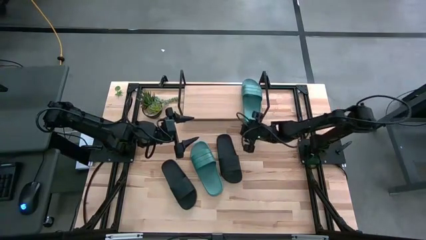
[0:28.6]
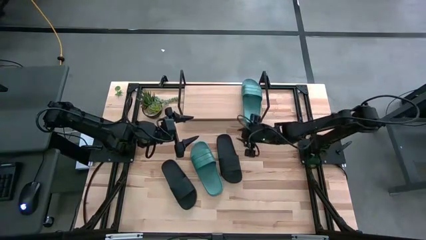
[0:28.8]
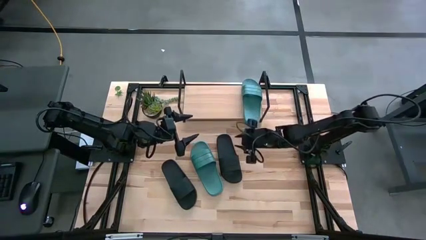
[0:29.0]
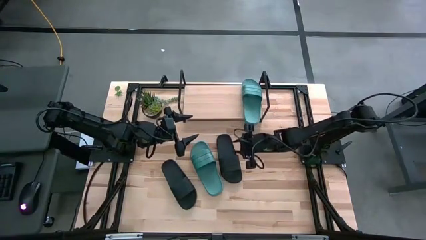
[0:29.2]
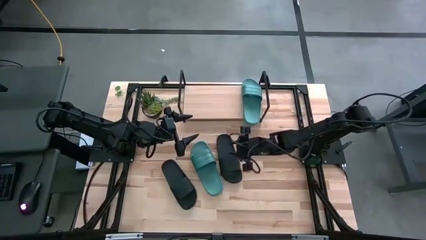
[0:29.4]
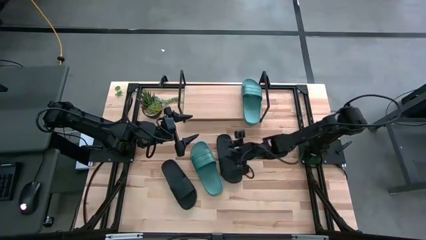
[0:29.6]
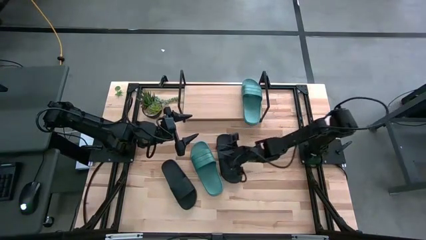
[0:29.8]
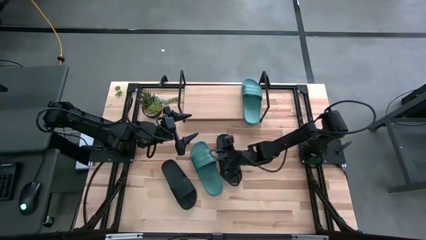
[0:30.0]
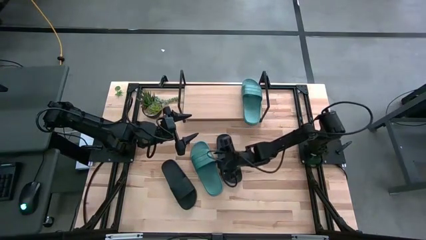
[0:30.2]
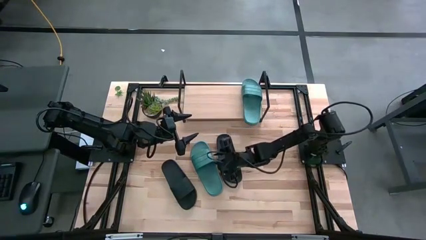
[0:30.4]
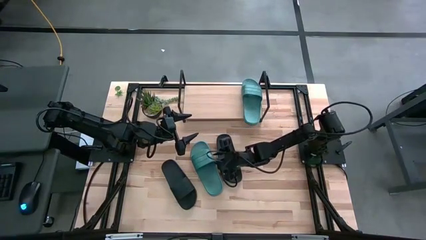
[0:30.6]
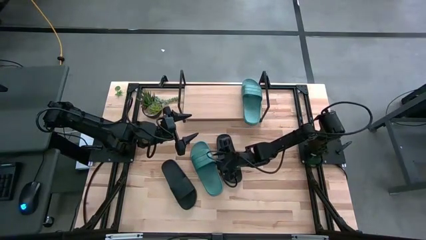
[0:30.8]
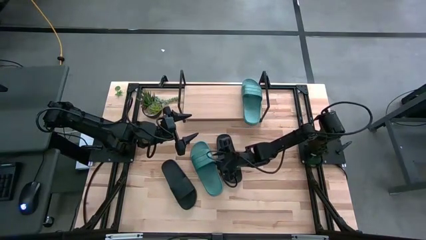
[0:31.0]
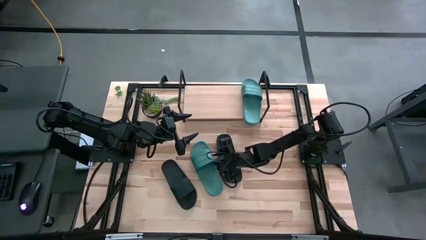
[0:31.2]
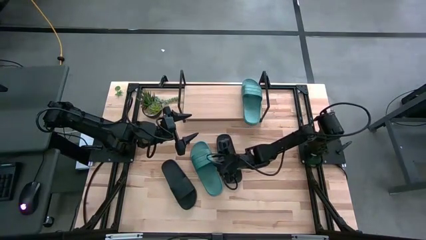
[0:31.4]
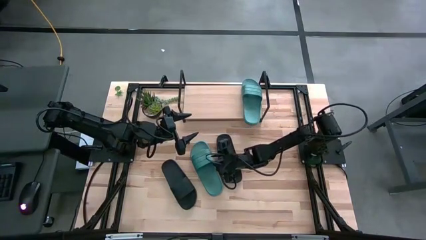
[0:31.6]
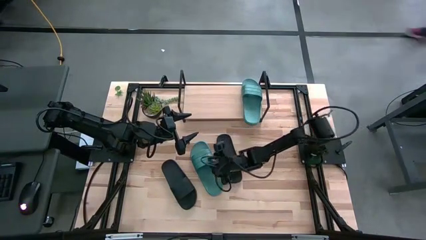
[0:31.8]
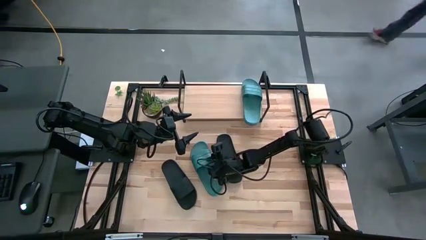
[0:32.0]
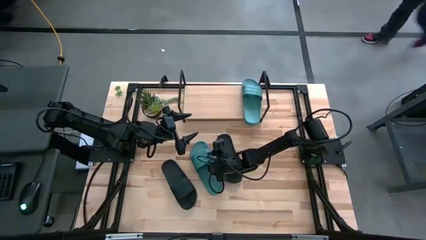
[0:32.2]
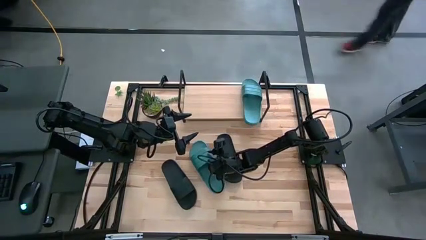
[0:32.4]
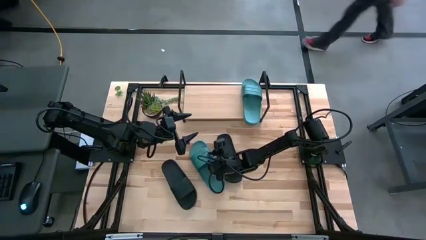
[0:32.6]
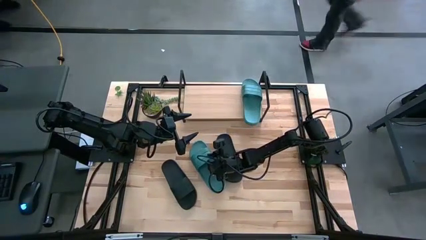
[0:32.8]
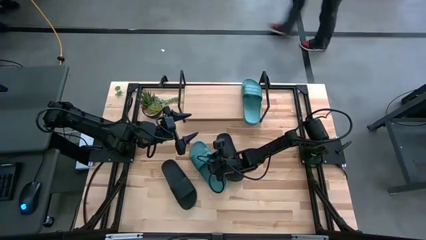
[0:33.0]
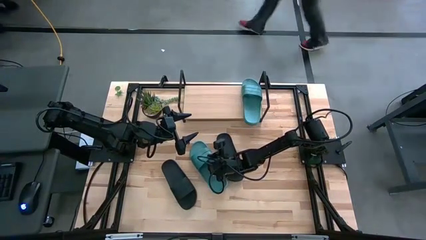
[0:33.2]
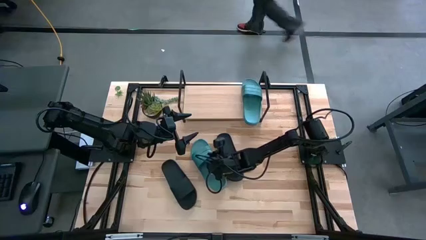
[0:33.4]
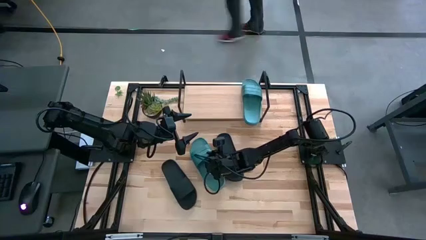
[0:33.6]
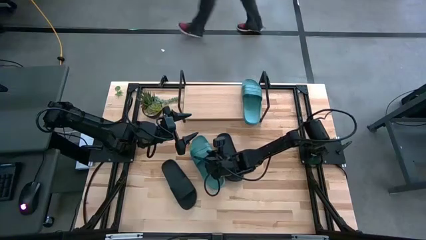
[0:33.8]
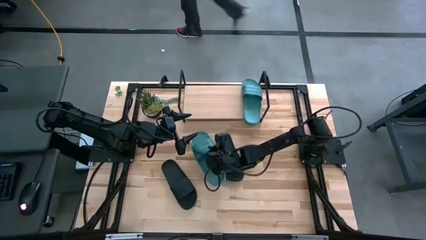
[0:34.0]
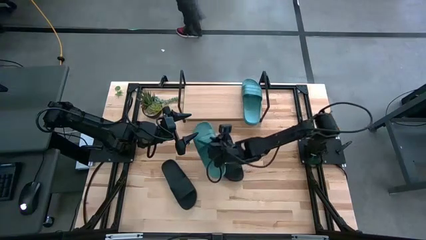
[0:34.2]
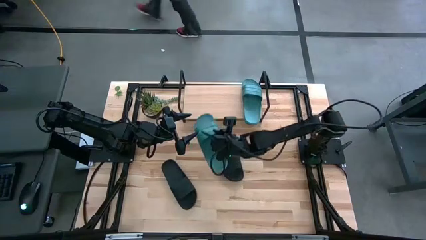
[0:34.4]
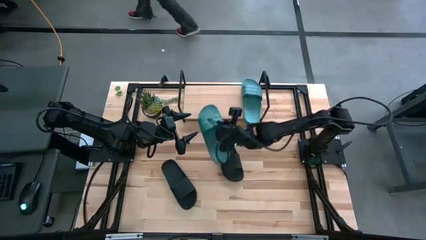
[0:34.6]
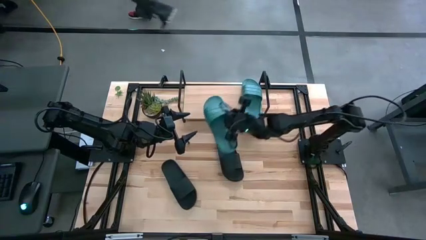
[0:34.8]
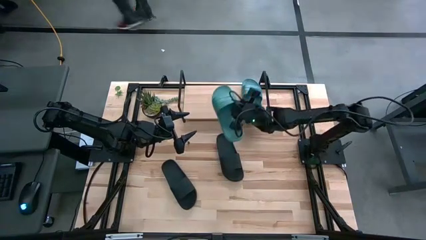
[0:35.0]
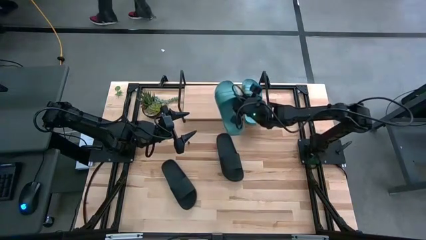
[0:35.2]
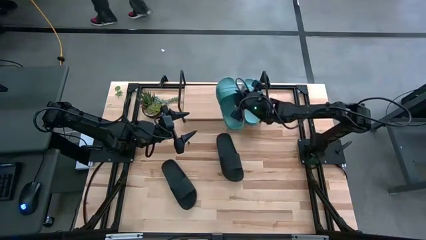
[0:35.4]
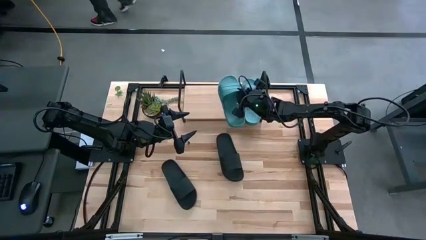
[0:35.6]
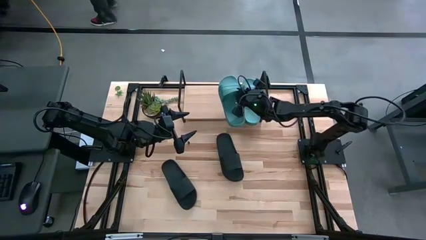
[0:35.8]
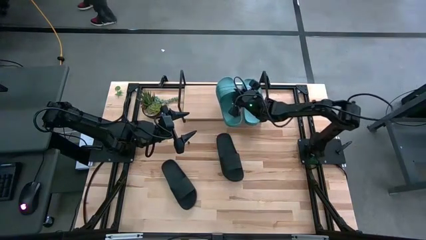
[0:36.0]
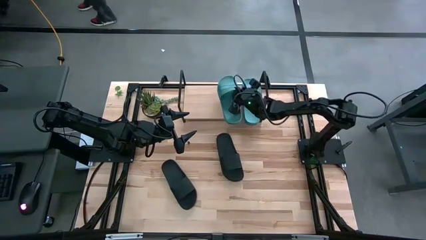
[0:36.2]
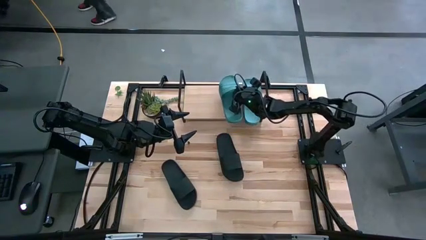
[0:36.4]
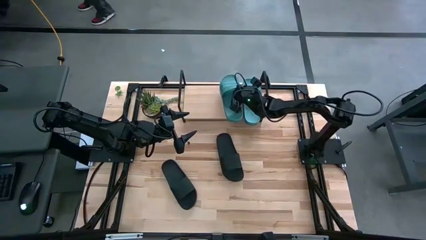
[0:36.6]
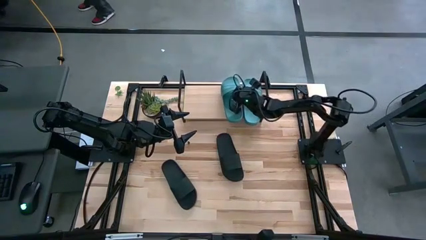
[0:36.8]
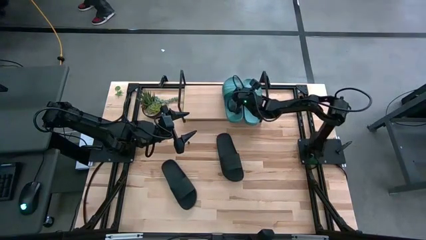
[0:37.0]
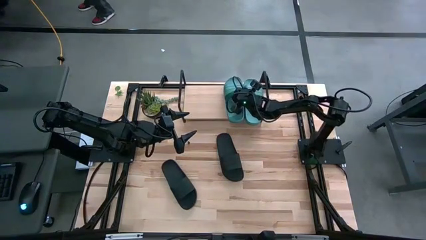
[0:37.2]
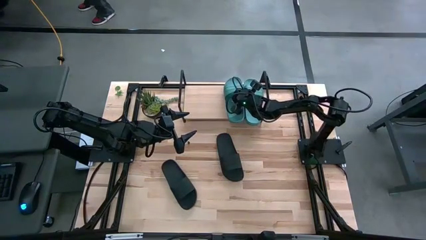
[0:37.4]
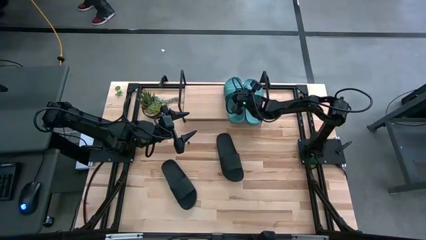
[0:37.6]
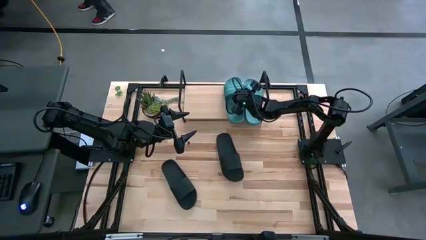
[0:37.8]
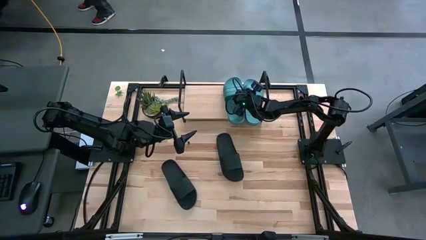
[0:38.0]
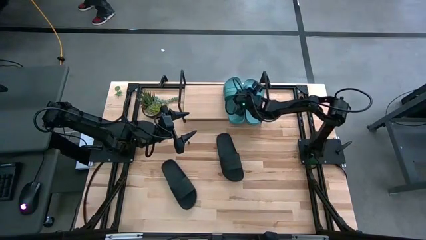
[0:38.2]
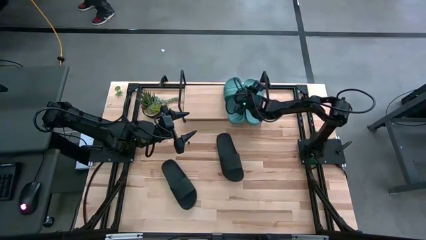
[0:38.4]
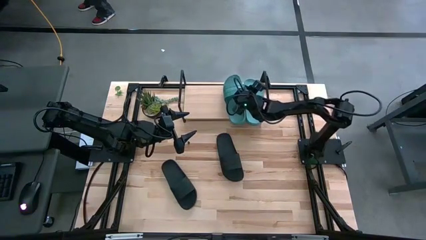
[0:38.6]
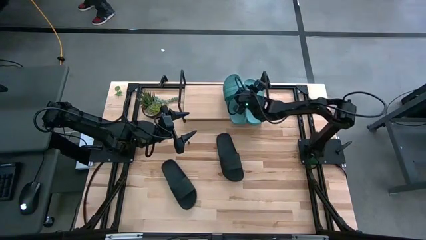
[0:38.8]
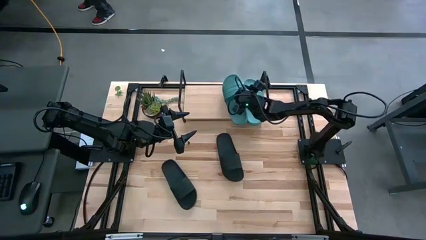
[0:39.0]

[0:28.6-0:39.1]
Task: Pick and place slides into the shelf
Put the green slide on the shelf

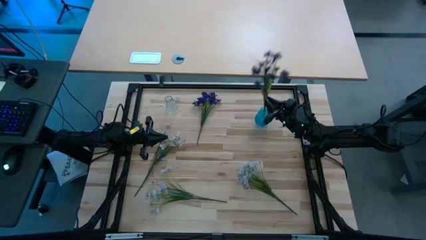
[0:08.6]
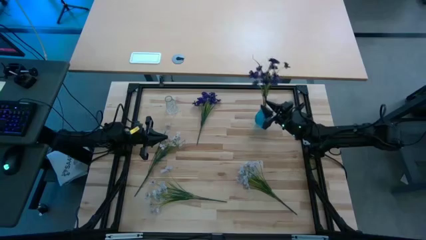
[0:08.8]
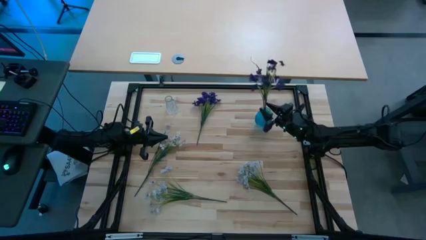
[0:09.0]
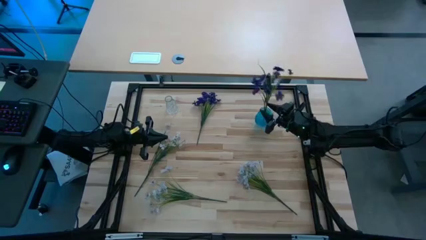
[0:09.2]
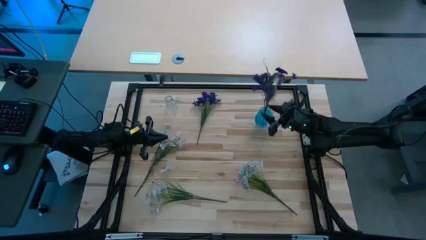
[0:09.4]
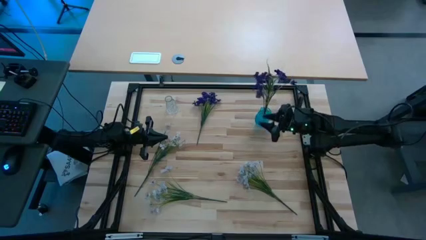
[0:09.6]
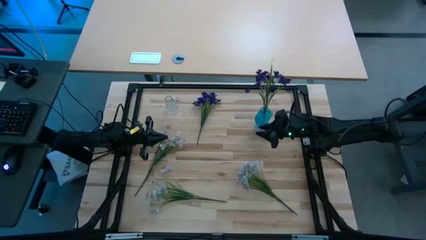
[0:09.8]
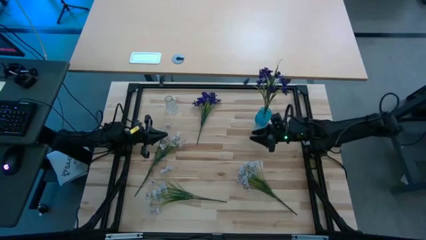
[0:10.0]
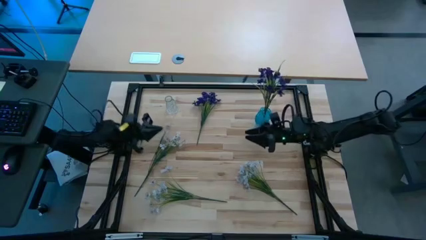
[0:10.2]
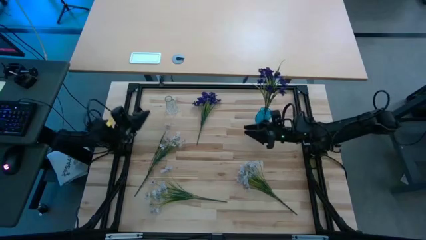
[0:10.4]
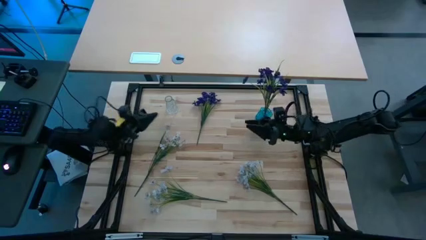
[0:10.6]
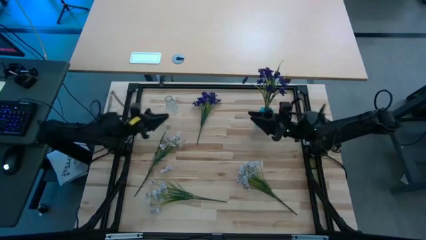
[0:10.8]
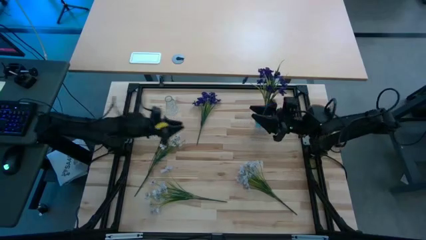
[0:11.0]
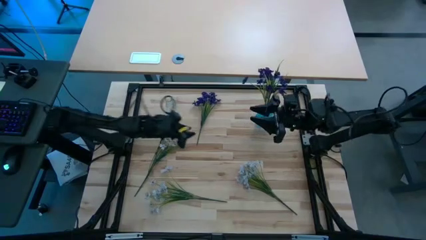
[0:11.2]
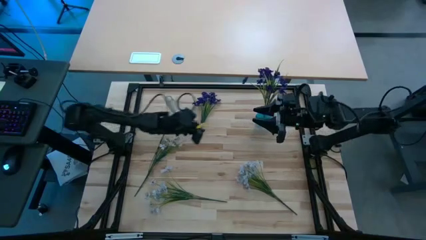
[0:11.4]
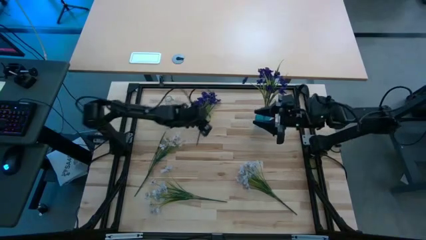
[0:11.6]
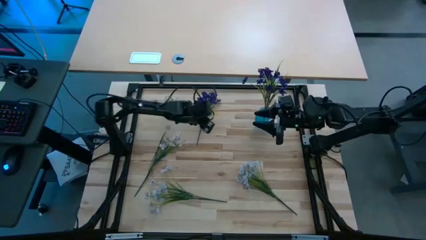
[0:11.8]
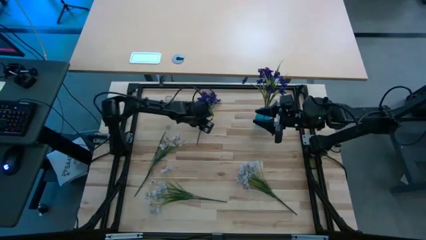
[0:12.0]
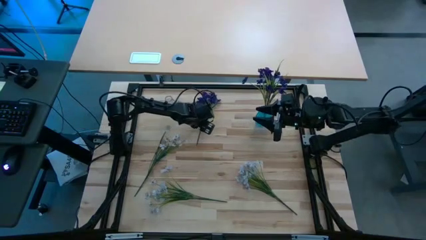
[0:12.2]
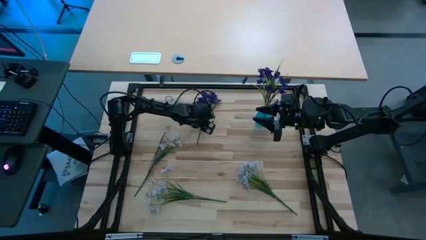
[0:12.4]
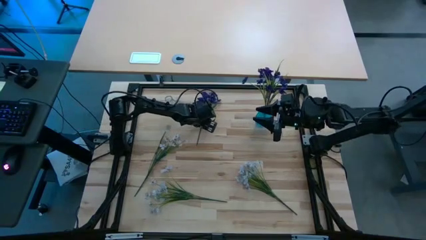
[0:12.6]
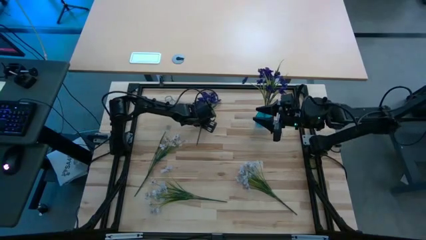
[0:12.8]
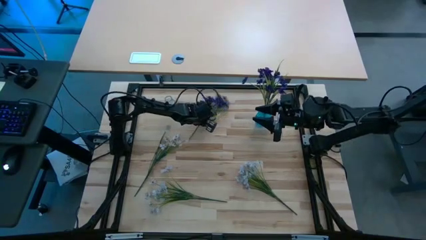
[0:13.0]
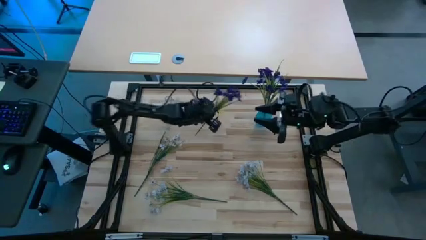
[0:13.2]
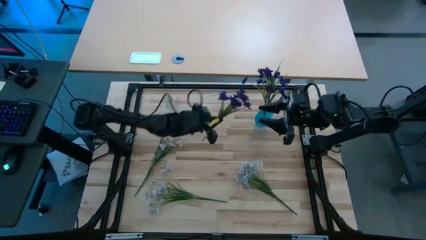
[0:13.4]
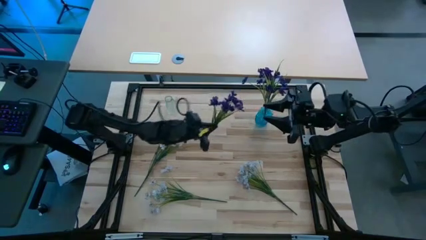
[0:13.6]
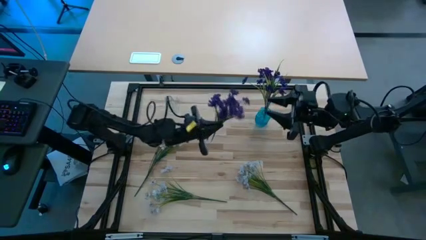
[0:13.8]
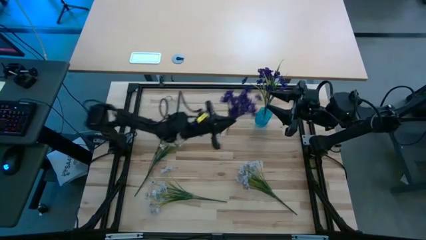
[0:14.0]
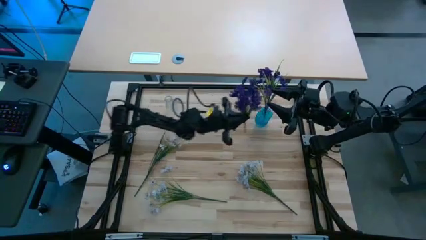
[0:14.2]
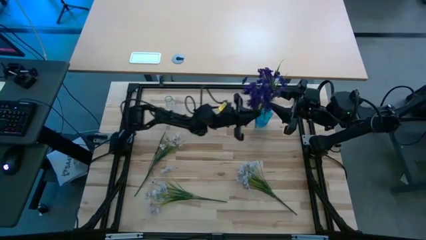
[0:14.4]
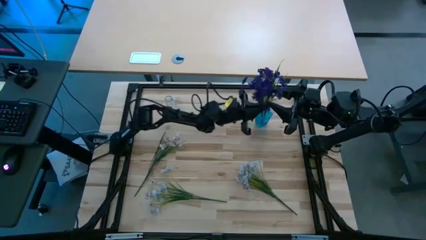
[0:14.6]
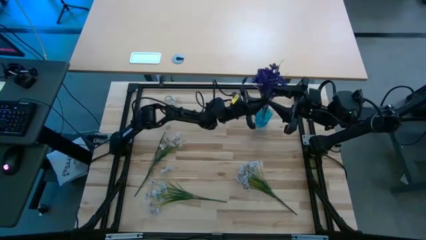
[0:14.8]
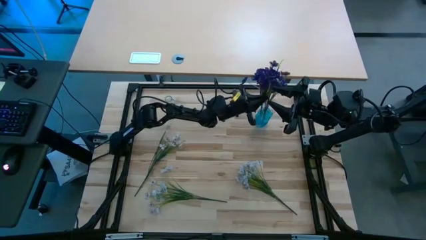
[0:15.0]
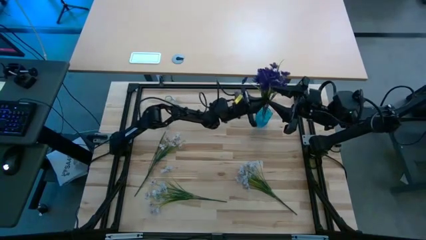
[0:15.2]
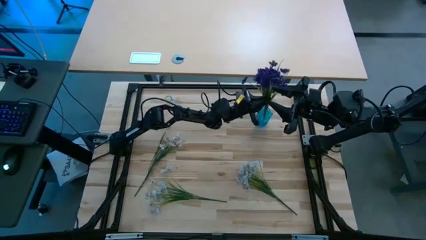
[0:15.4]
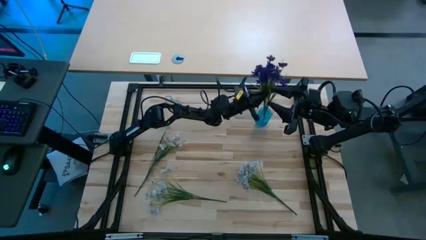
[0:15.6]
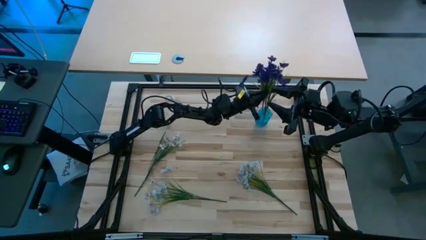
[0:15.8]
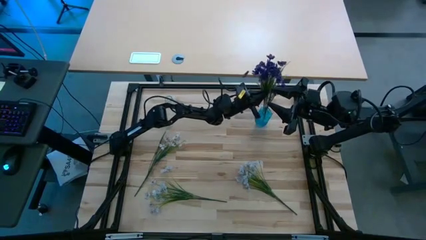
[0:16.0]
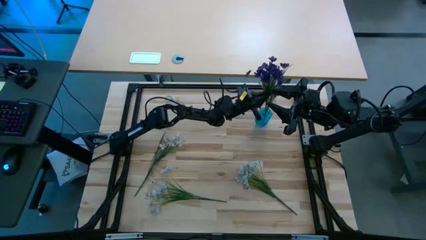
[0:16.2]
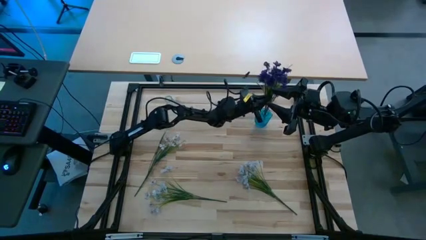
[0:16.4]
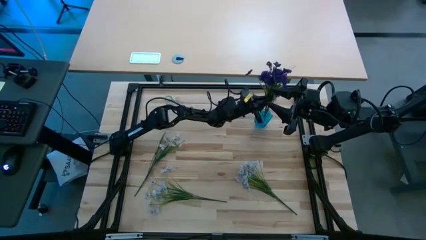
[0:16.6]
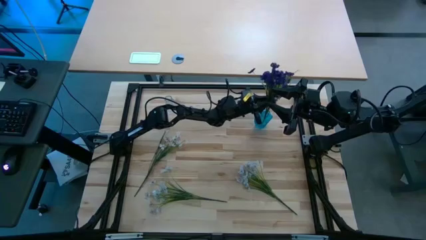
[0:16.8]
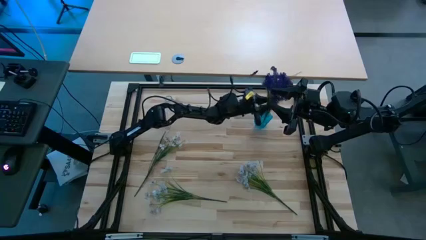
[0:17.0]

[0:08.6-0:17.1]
Task: Sort flowers into vase by color
Put the purple flowers into the blue flower vase
